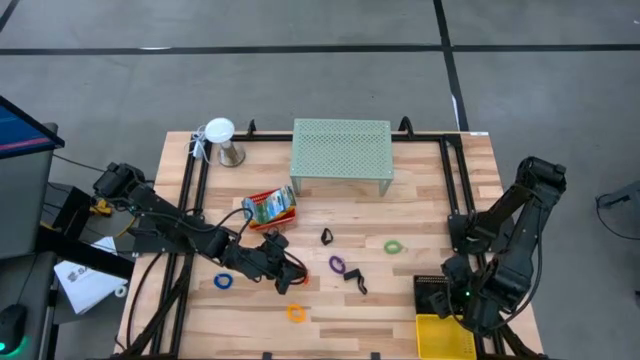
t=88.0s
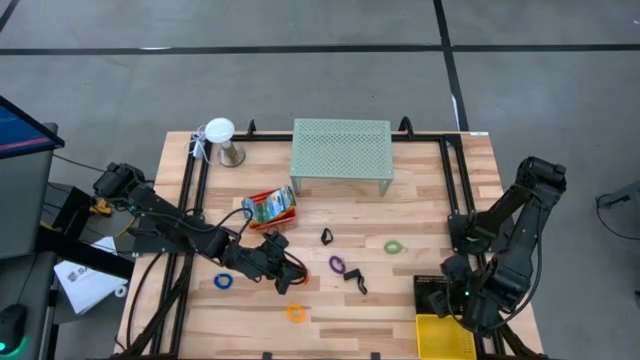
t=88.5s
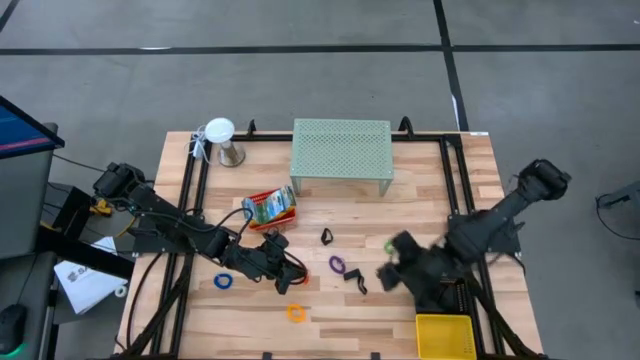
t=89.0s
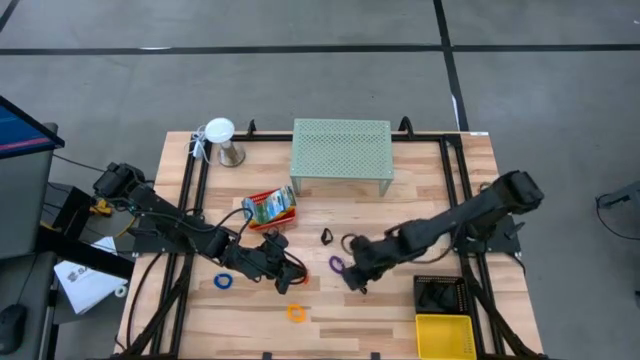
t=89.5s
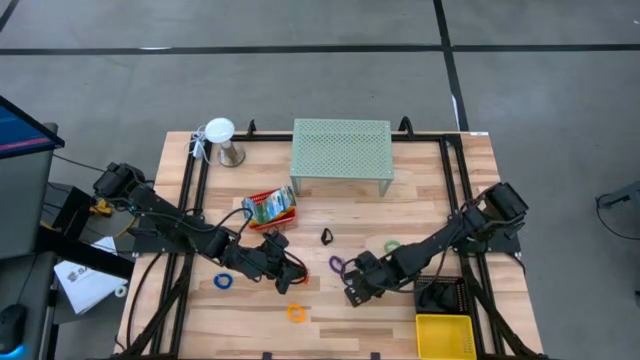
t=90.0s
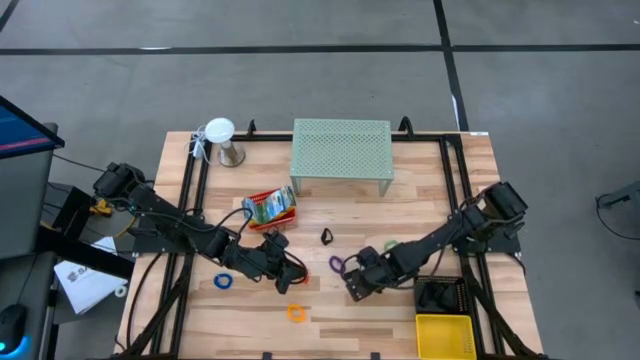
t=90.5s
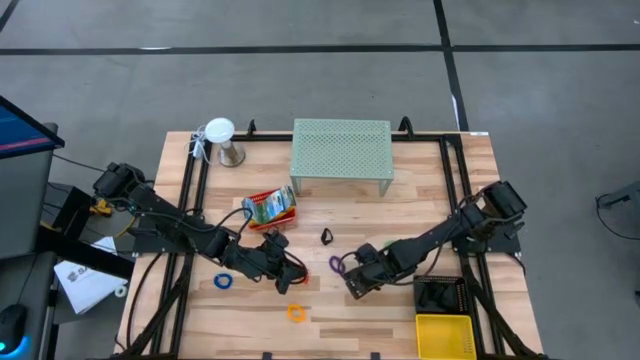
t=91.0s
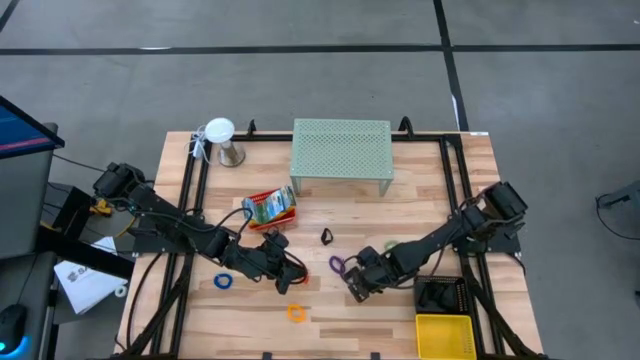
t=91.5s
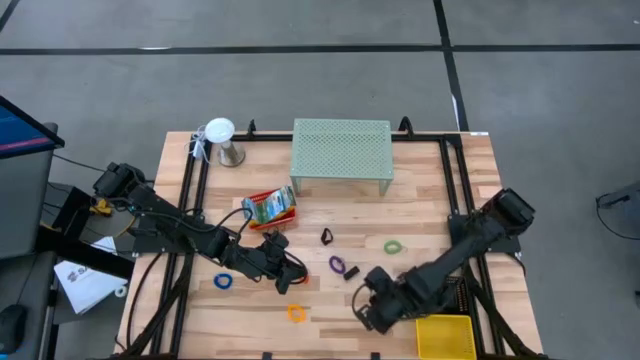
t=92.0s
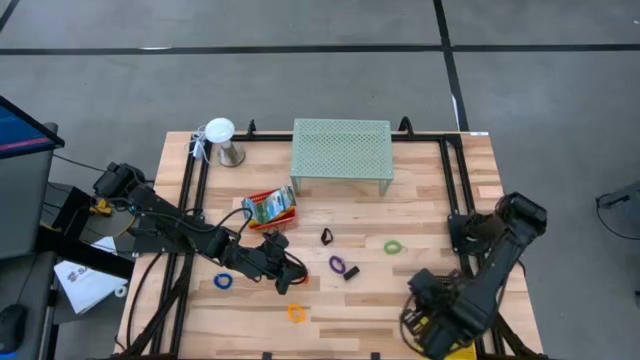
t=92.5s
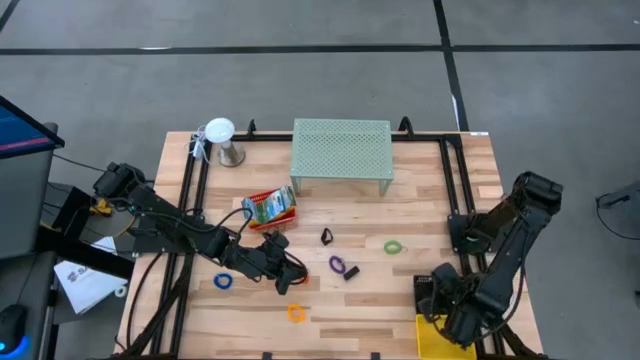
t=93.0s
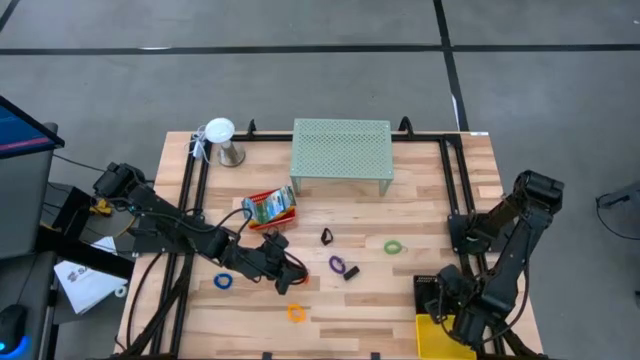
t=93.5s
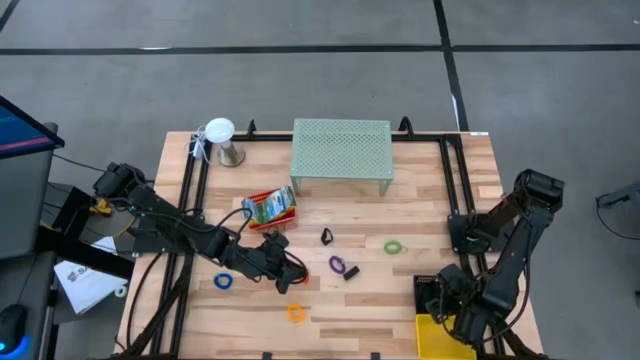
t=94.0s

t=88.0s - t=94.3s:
Task: Pick & Place Office Desk Supplies
Put the black rubber band into the black bin

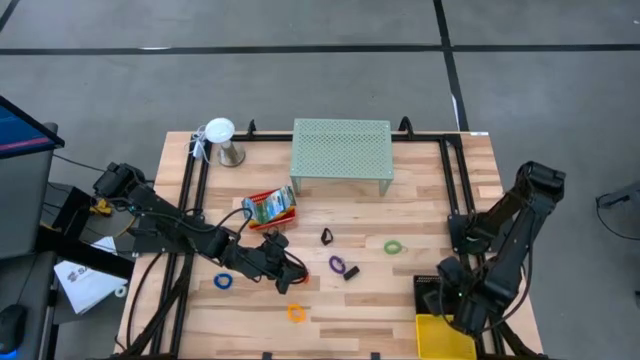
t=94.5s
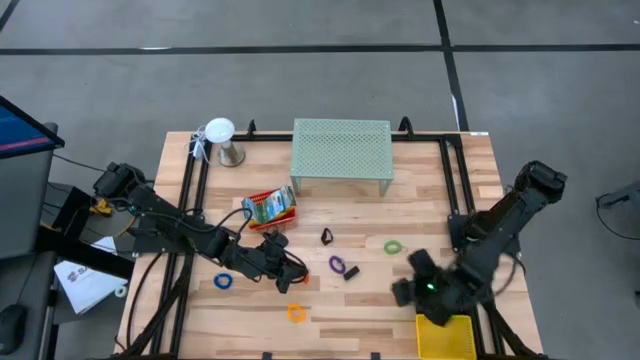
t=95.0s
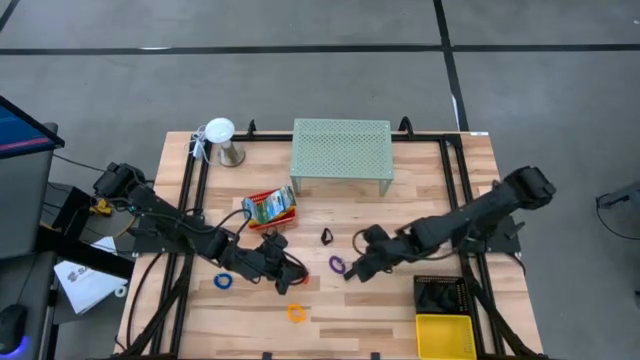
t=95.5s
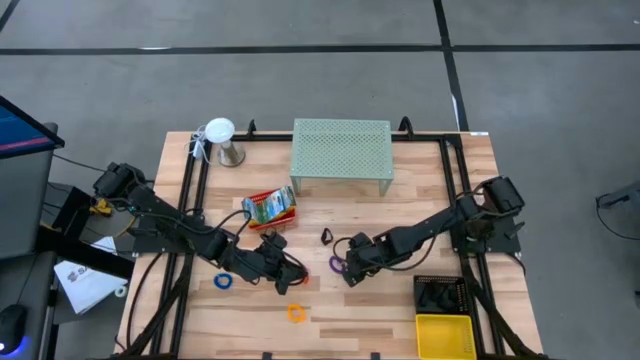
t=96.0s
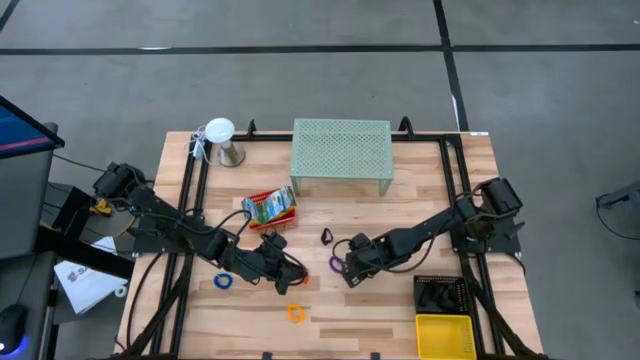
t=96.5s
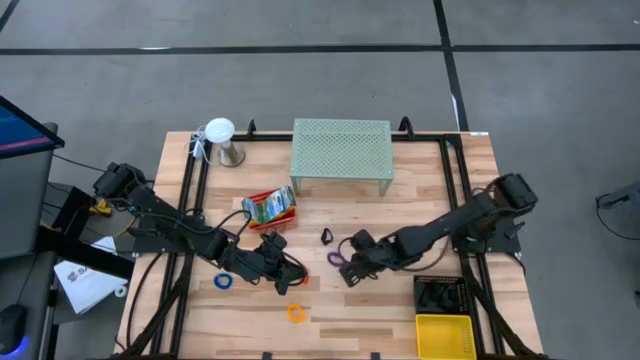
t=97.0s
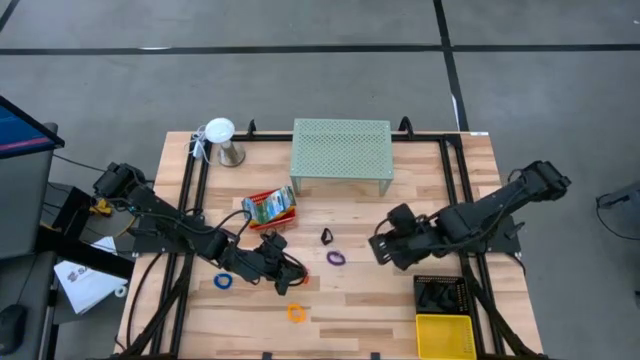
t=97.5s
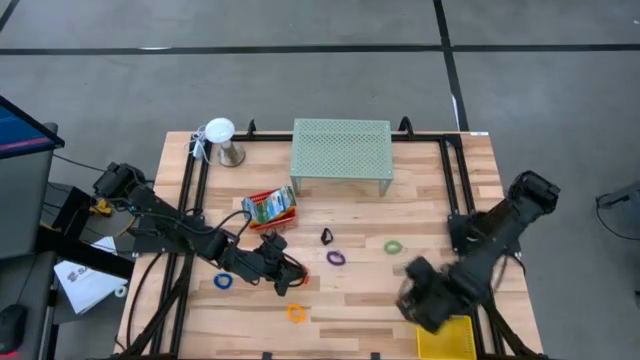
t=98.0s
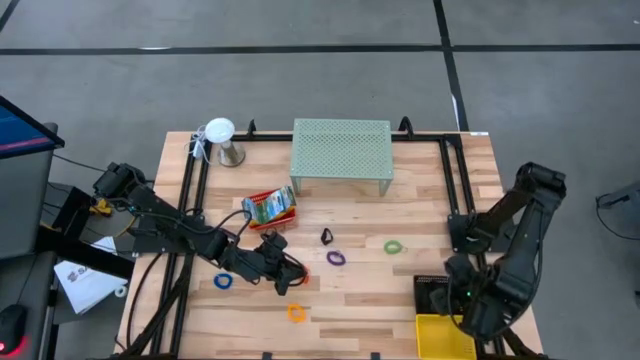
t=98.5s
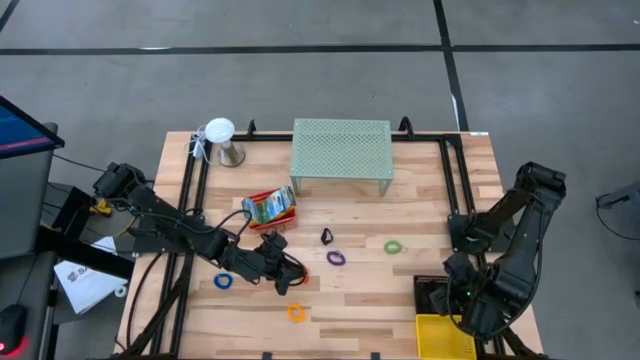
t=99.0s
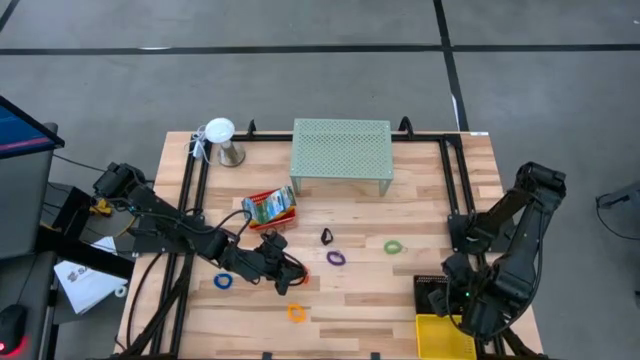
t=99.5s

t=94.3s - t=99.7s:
Put the black rubber band into the black bin

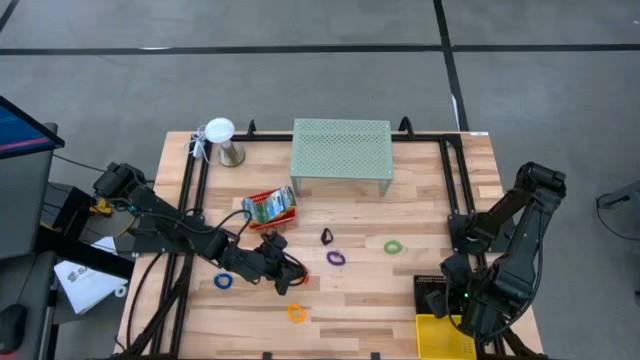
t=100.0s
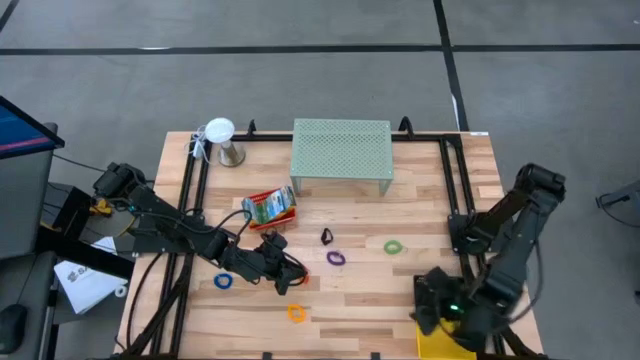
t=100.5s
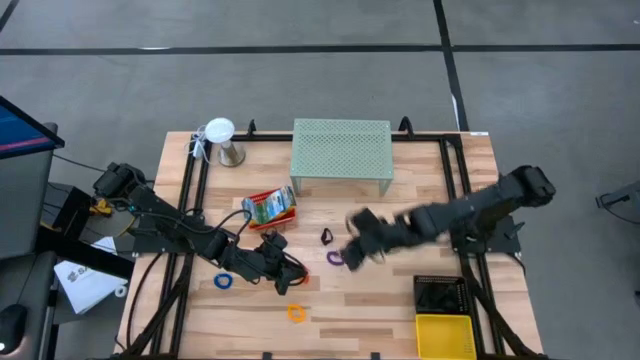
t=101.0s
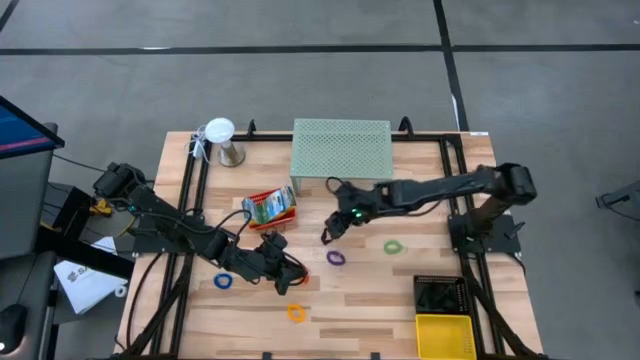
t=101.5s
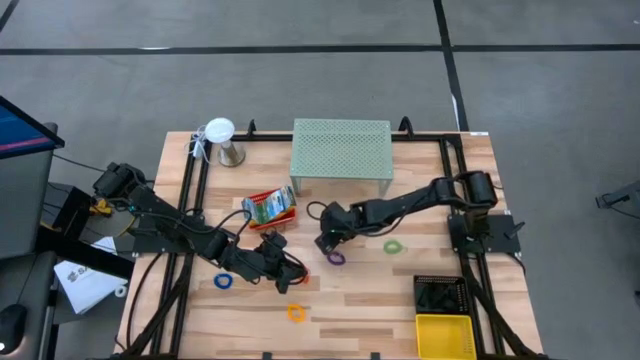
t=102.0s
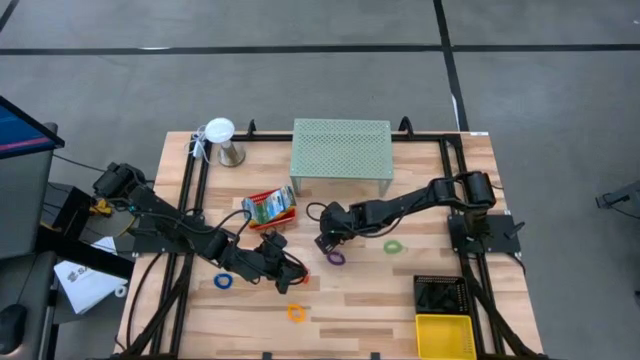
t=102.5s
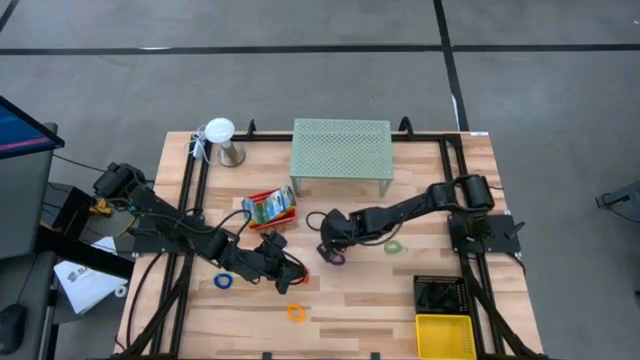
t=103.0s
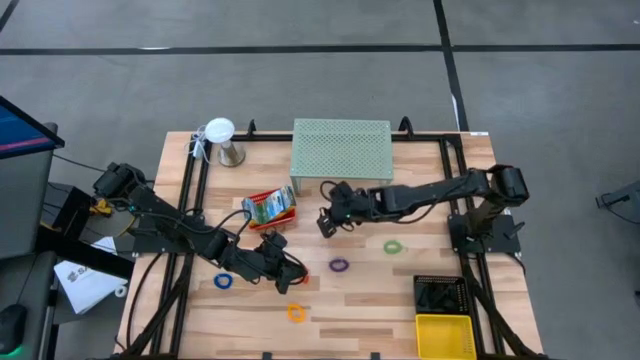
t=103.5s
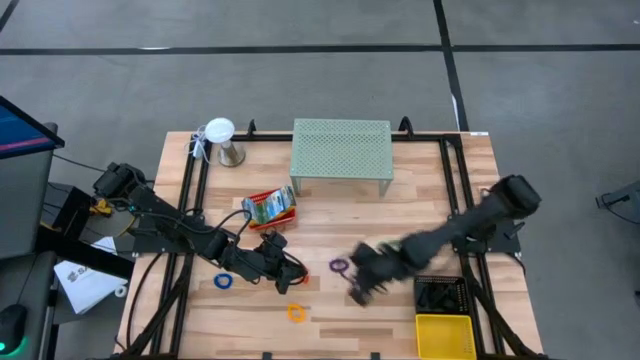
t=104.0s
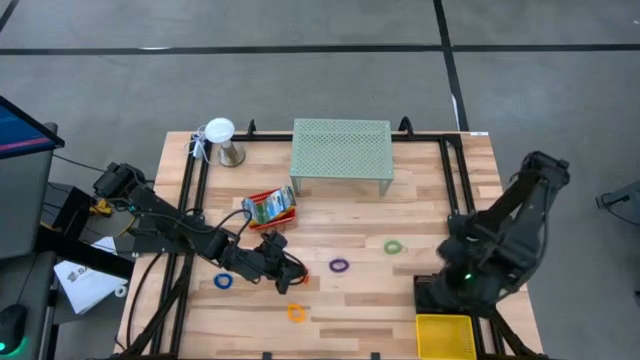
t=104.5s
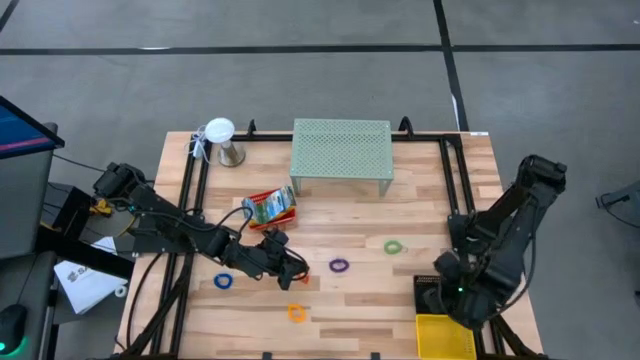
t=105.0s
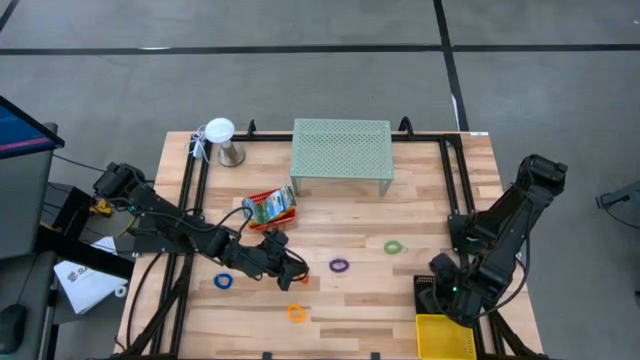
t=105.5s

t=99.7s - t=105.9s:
Put the black rubber band into the black bin

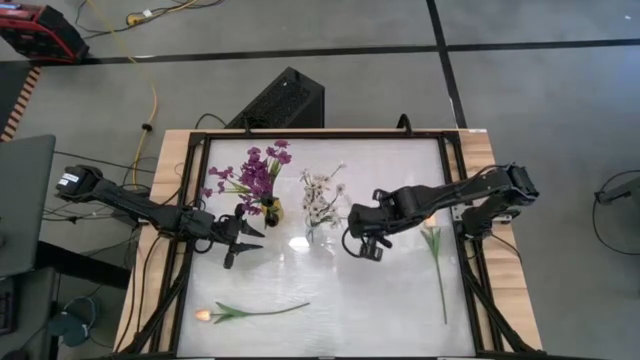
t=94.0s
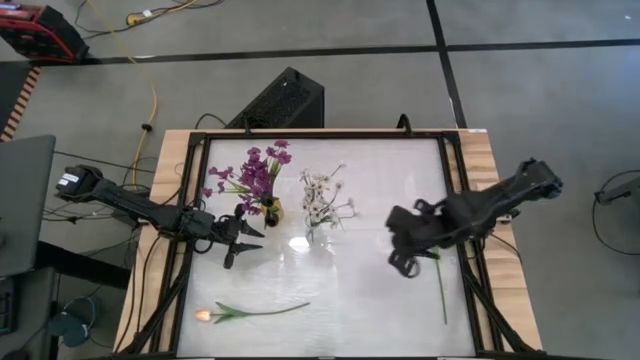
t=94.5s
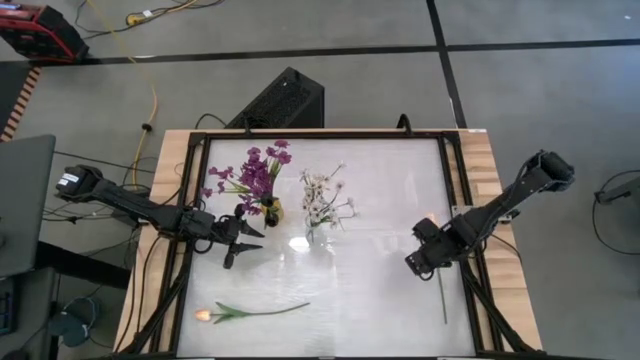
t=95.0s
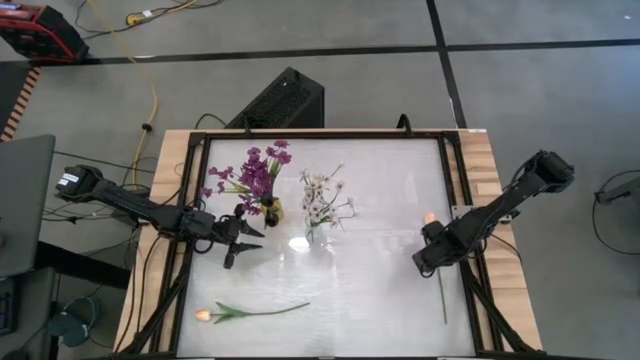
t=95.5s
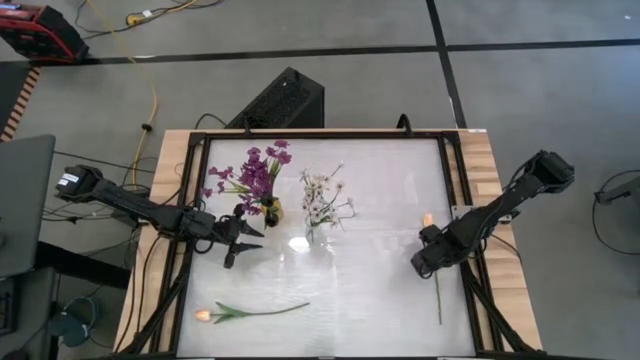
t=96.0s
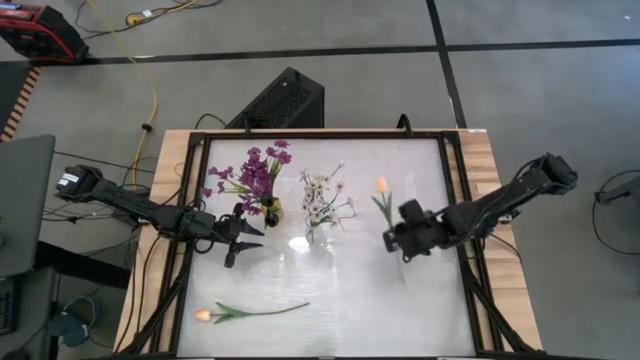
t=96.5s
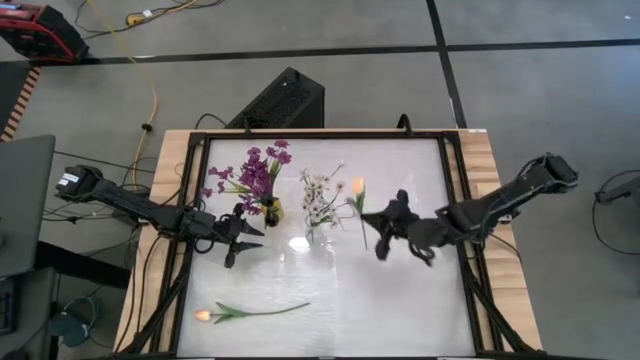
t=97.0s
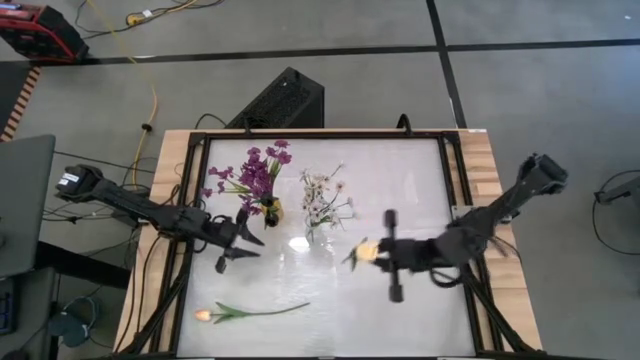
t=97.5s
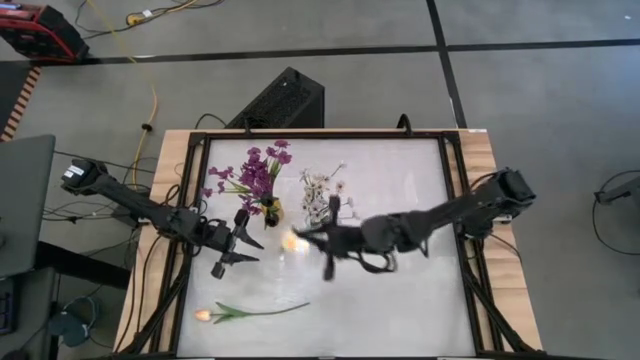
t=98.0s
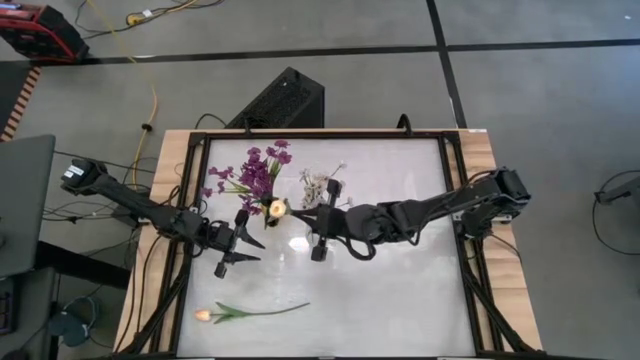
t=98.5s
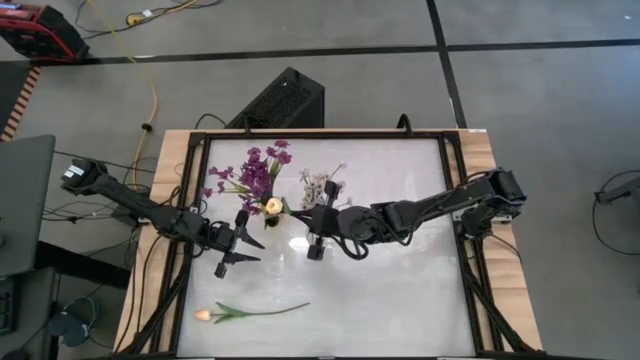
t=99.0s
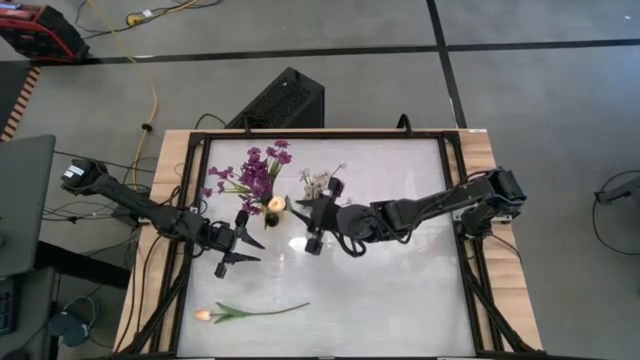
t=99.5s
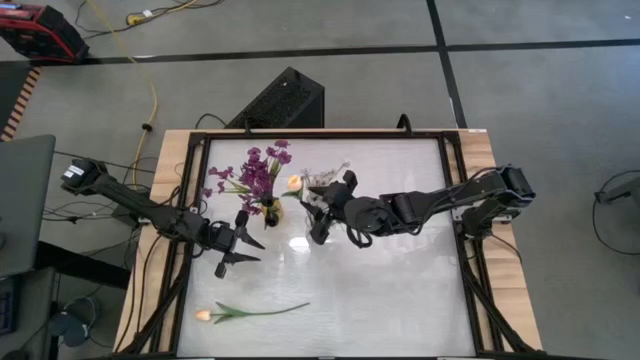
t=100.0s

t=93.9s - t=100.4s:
Task: Sort flowers into vase by color
Put the right white tulip into the transparent vase
